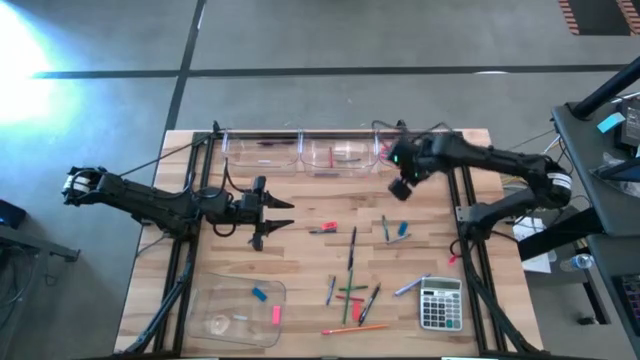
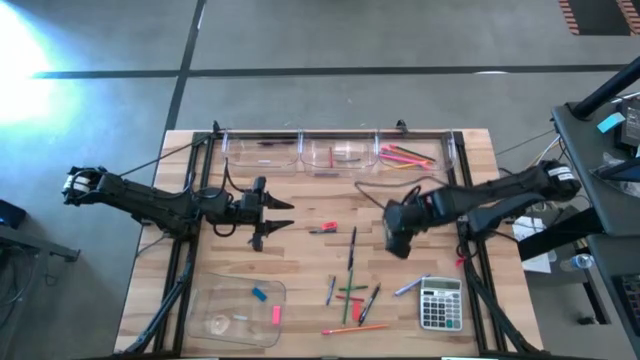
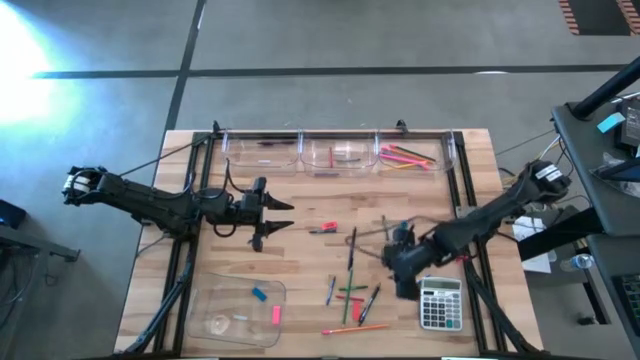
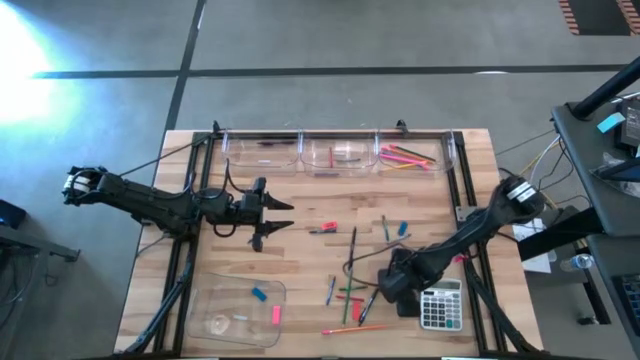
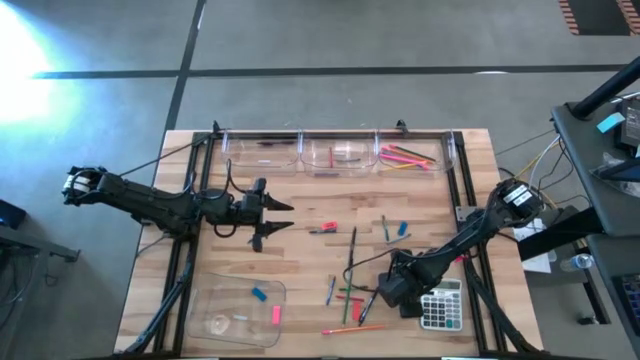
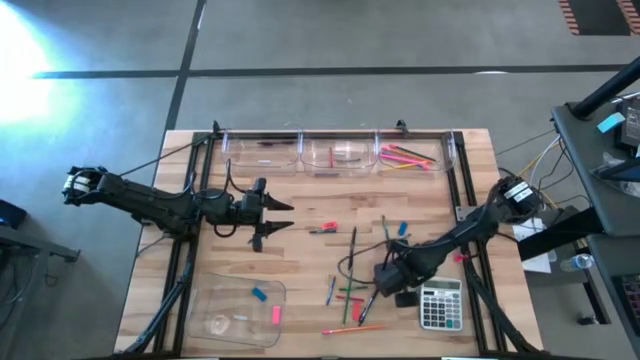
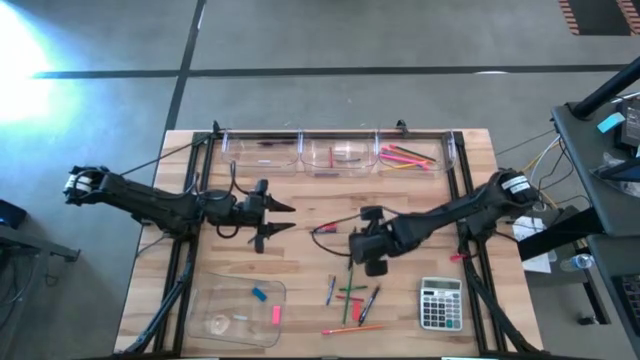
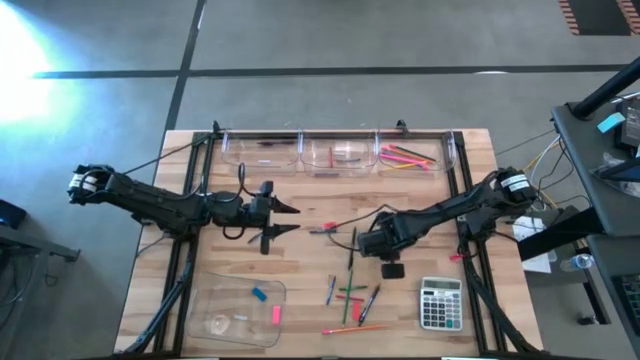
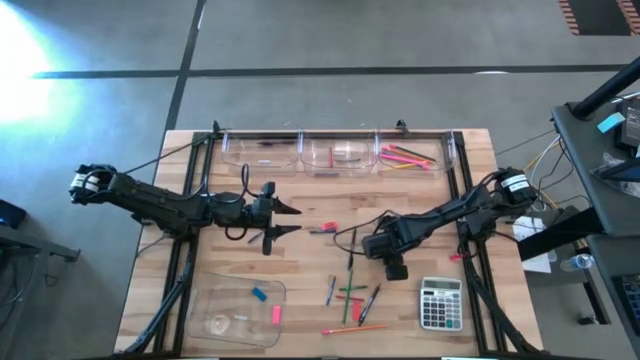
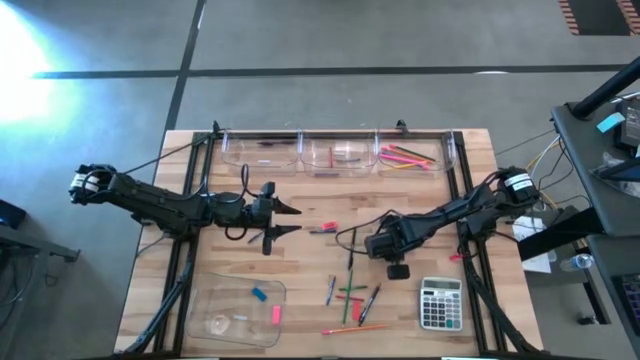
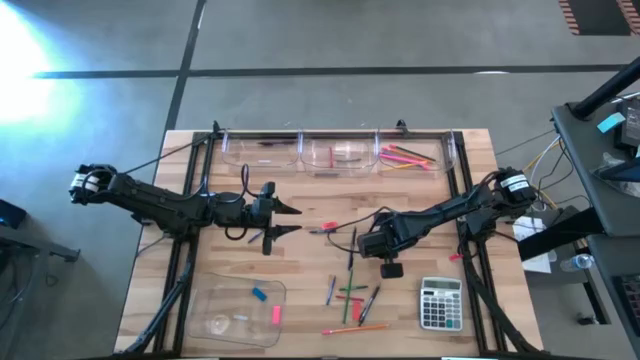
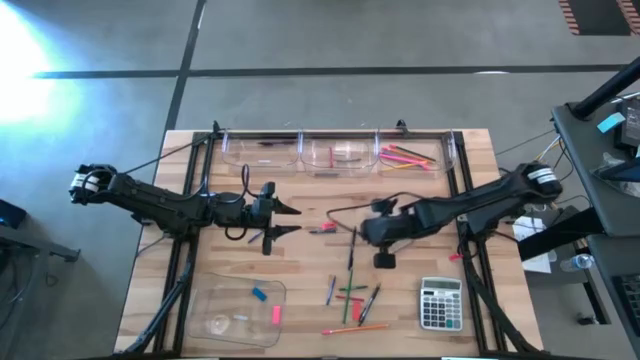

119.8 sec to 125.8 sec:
Task: Sort crayons/erasers/pens/pencils in bins
Put the gray pen into the top left transparent bin

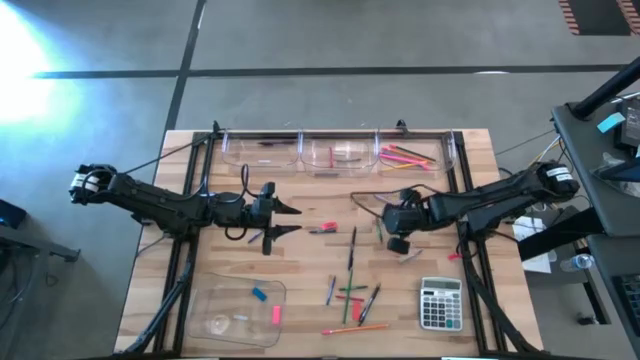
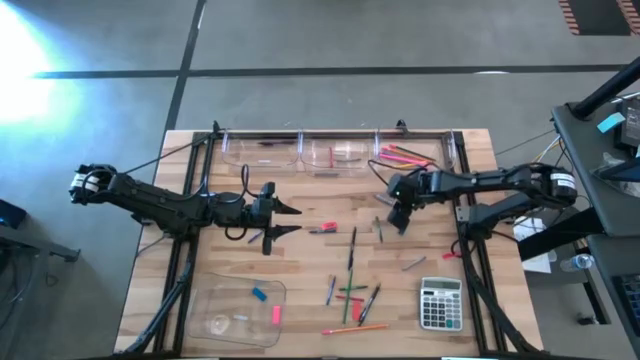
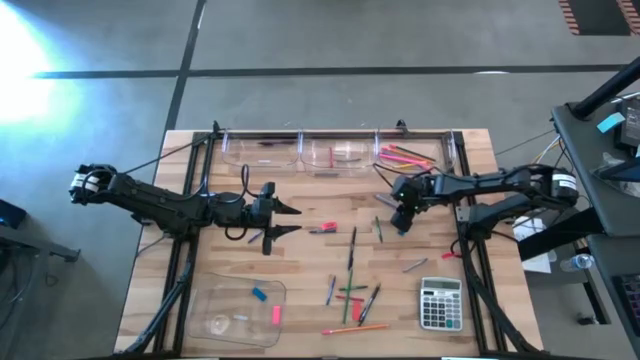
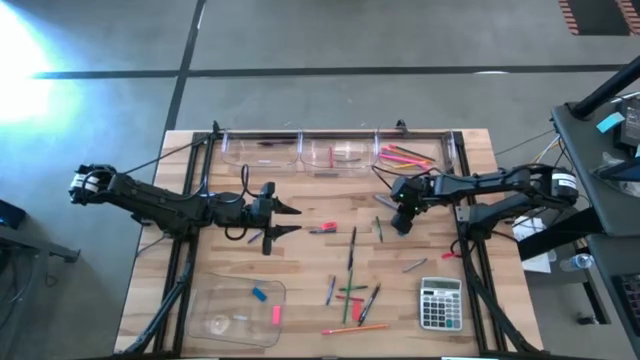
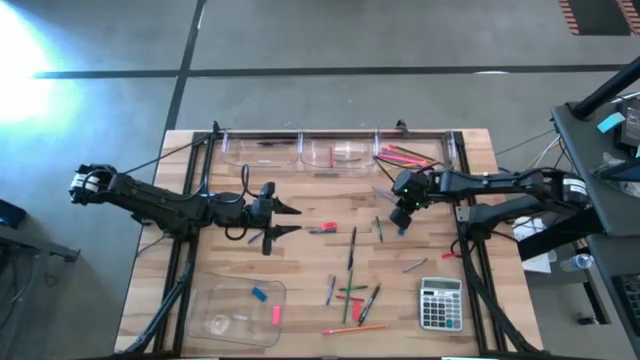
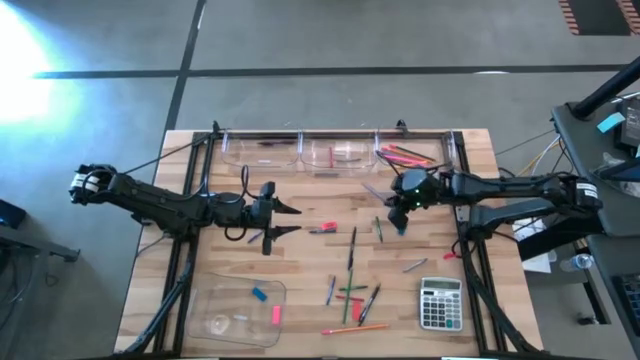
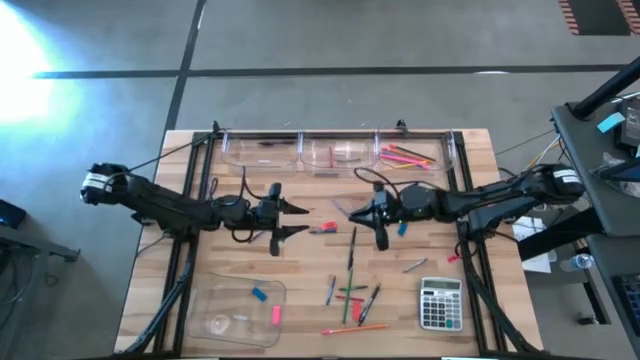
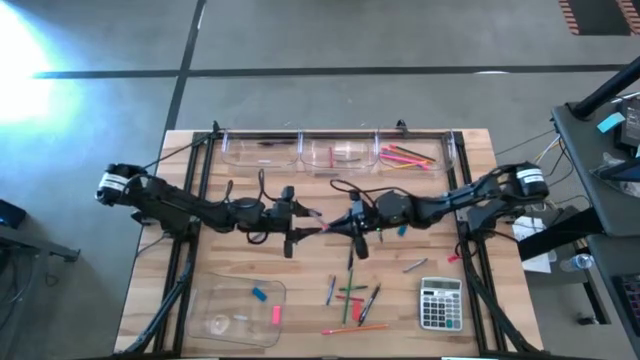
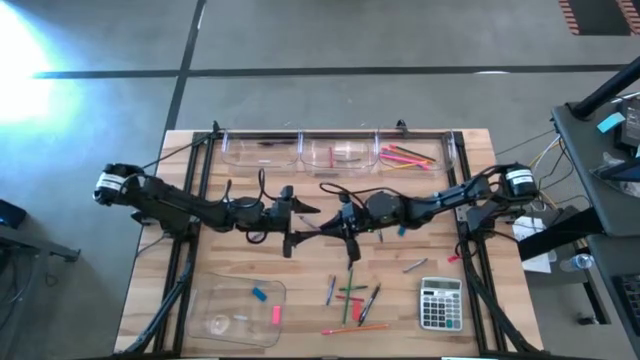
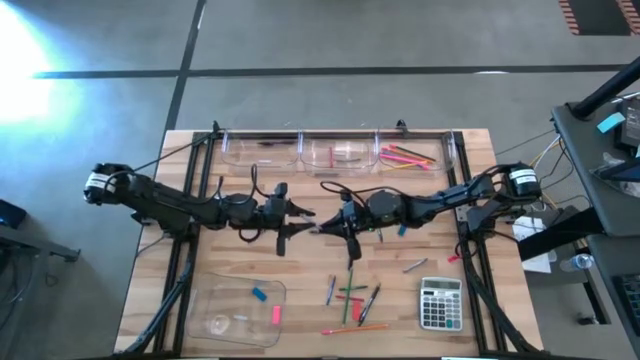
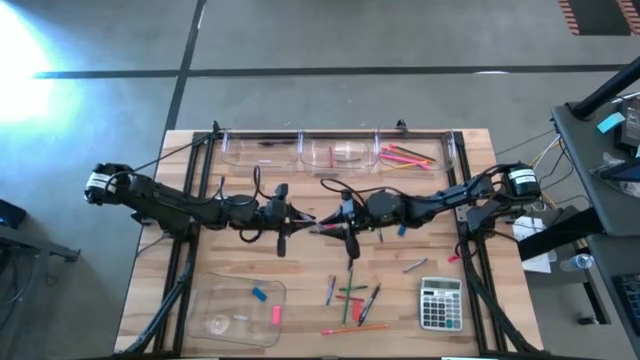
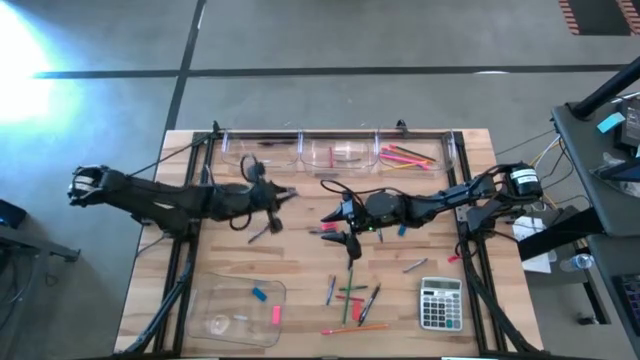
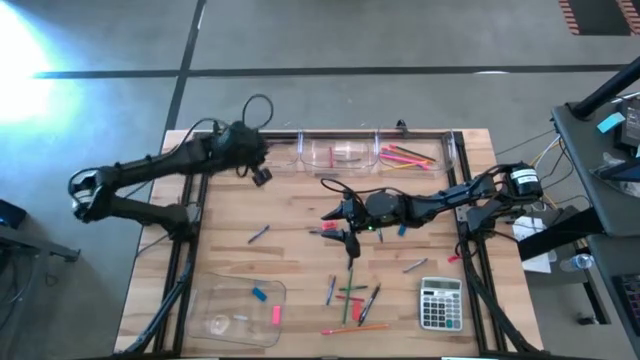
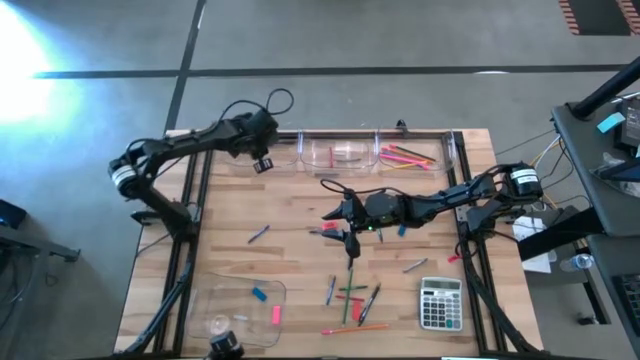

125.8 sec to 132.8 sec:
Put the gray pen into the top left transparent bin

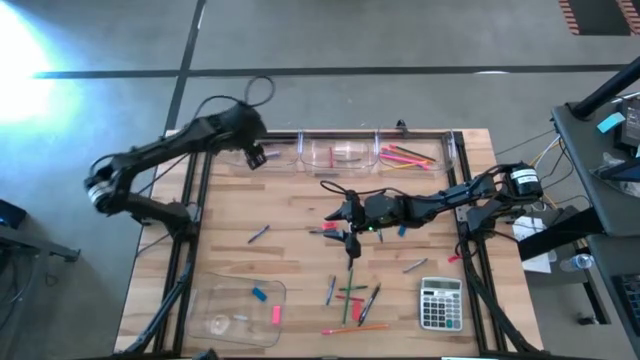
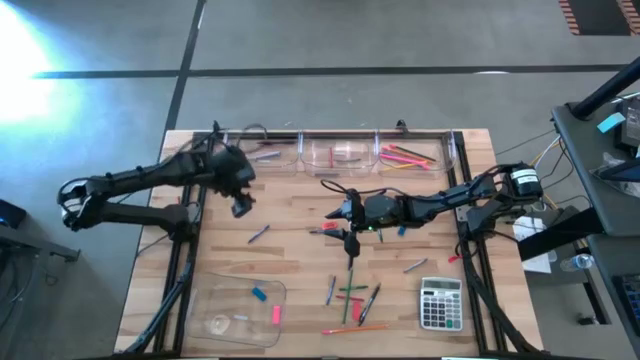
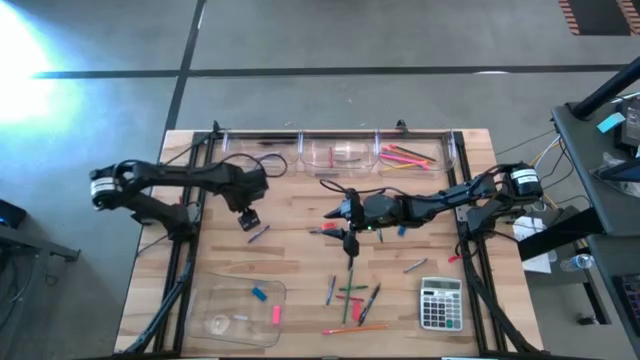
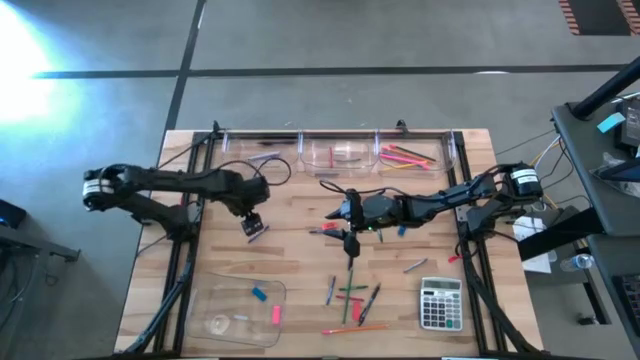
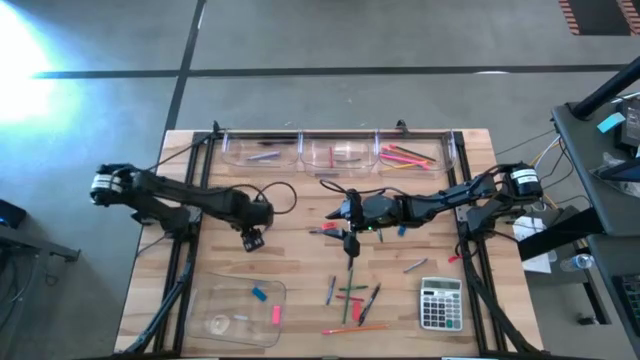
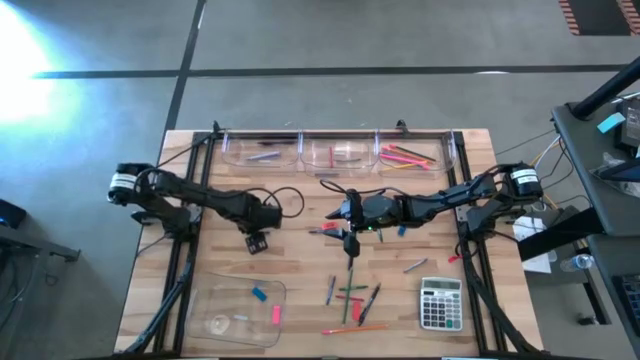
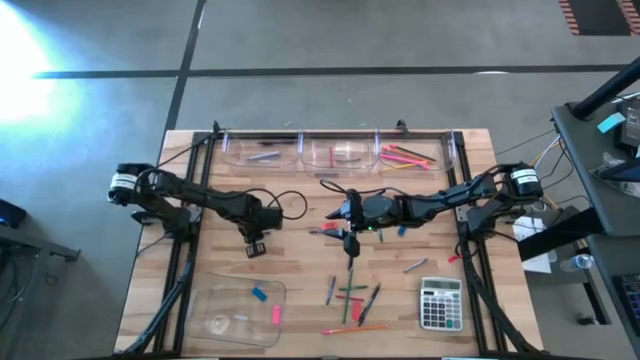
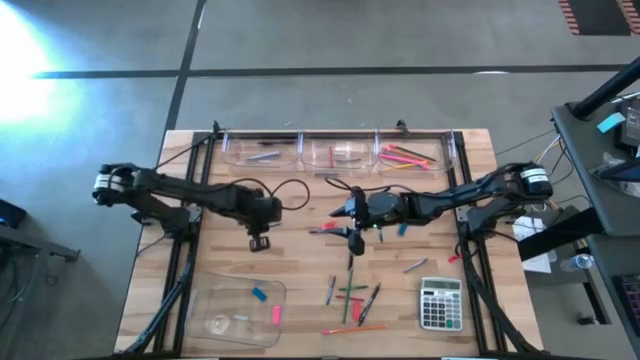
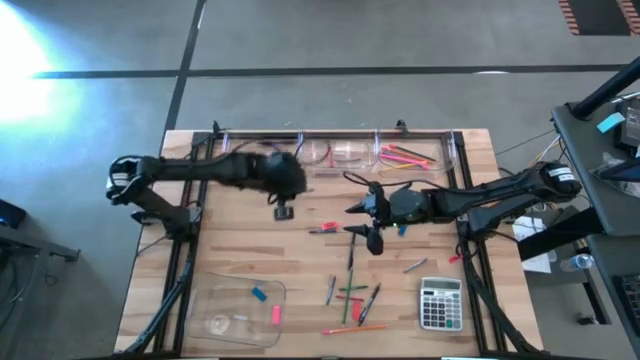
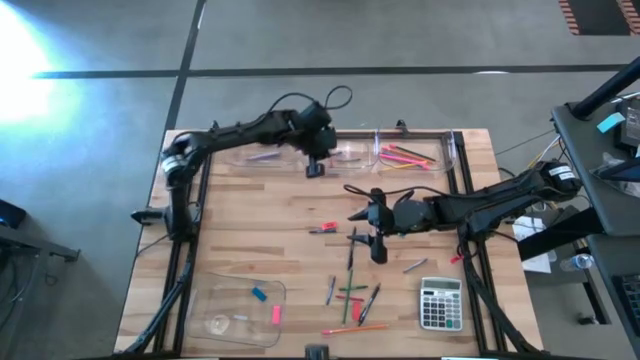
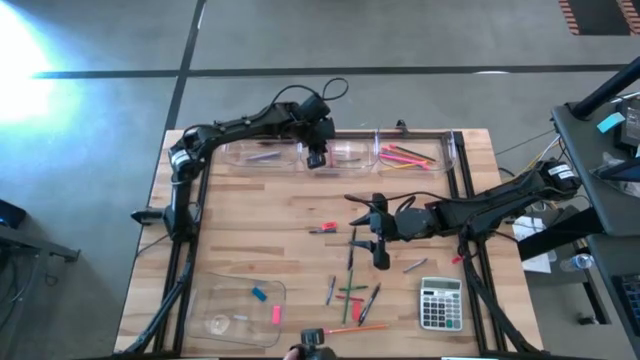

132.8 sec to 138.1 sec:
Put the blue crayon into the top middle transparent bin

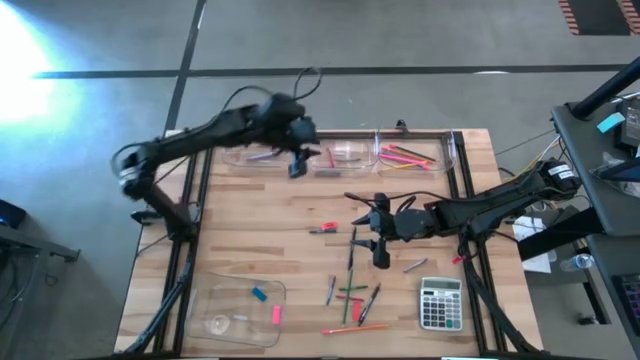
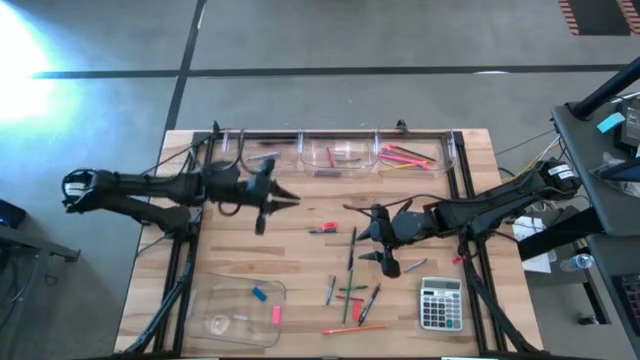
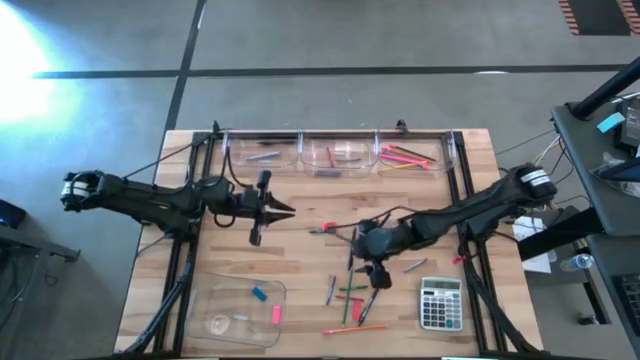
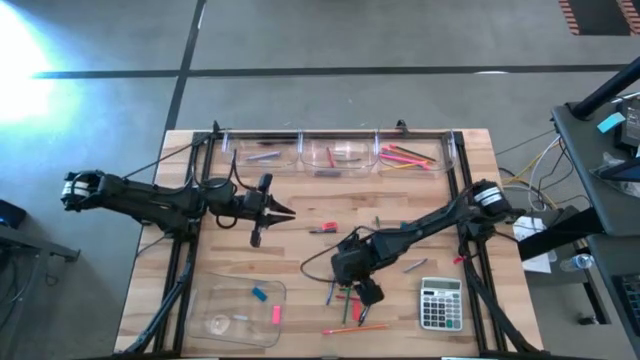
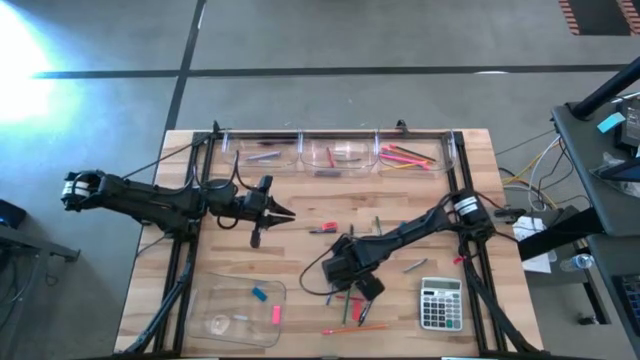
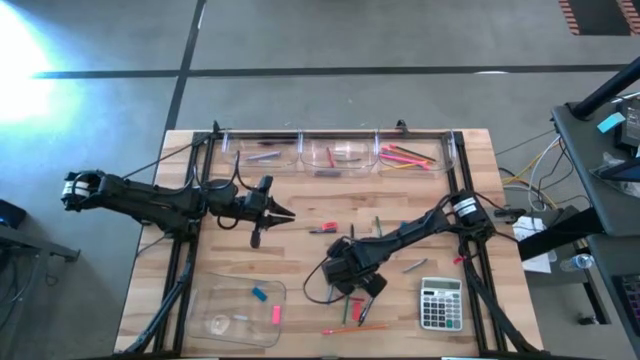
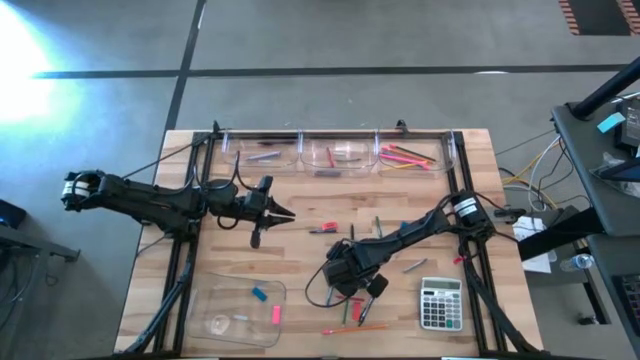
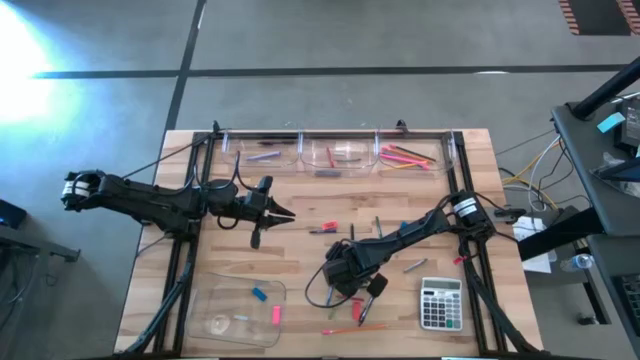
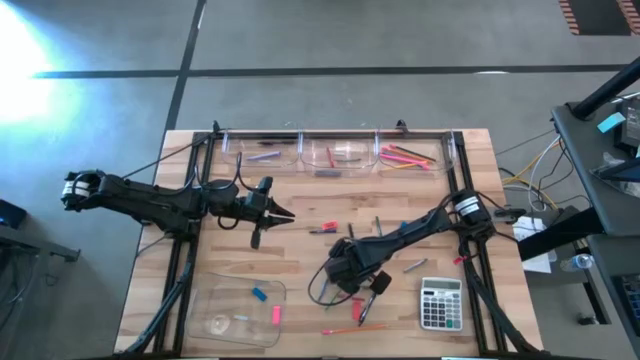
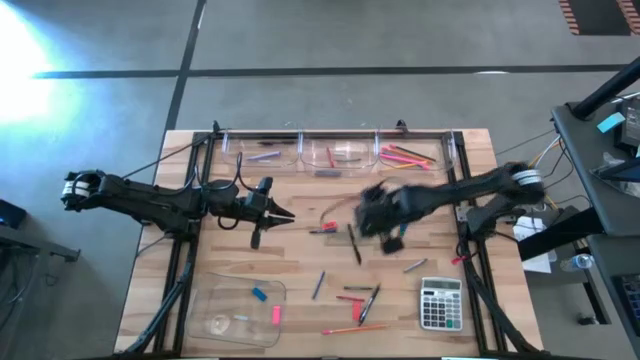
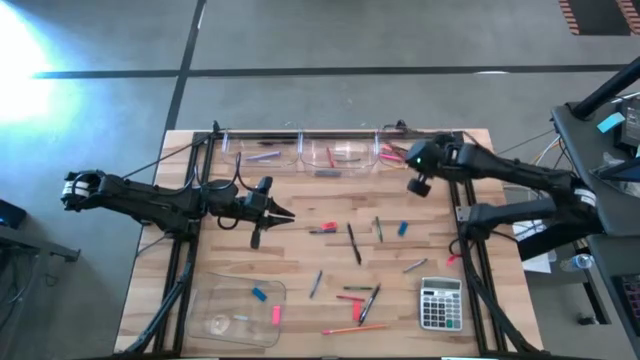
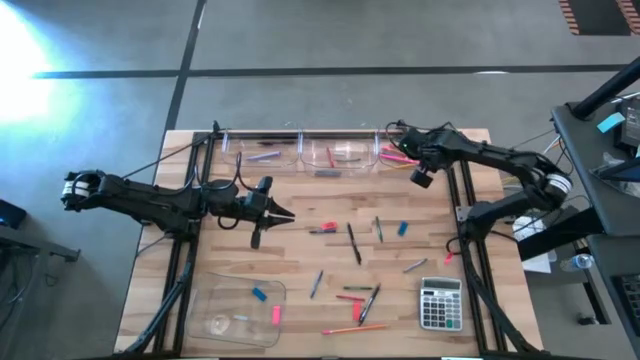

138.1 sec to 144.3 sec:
Put the green pencil into the top right transparent bin
